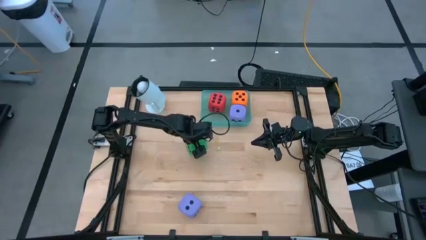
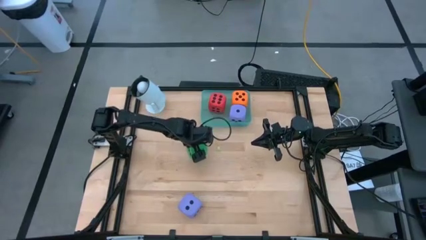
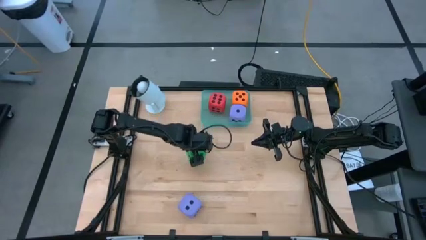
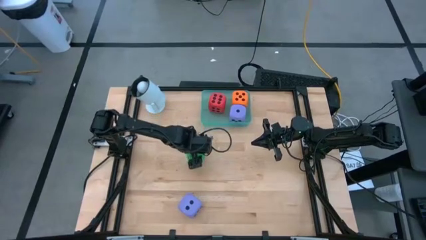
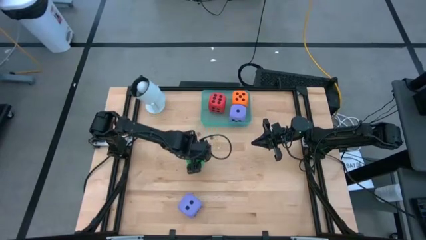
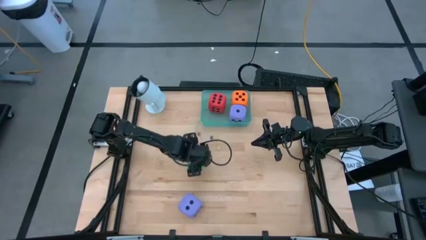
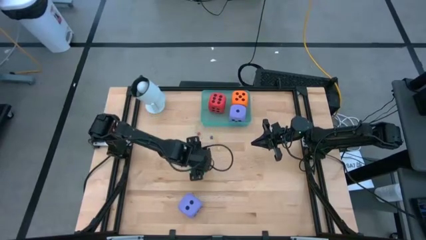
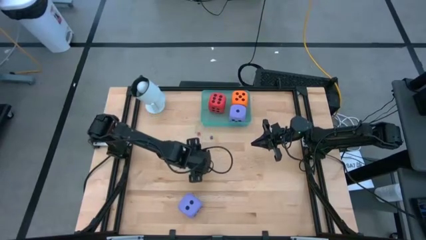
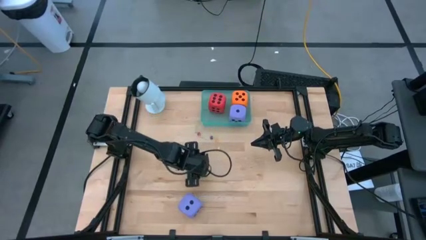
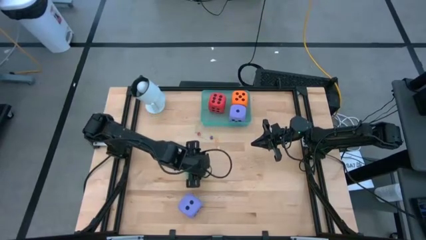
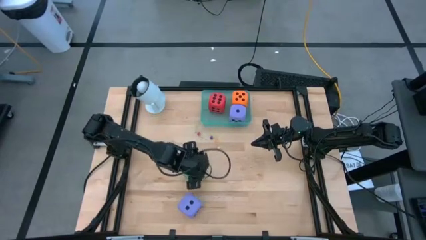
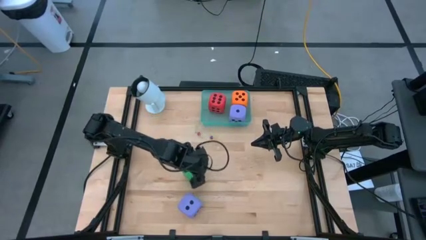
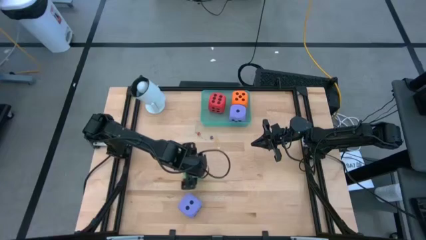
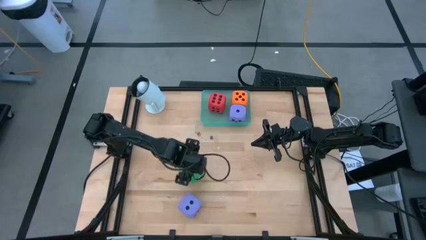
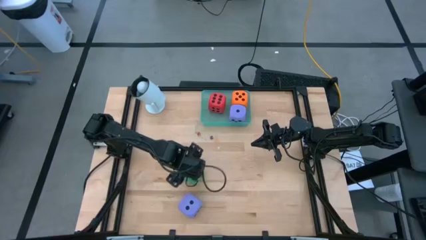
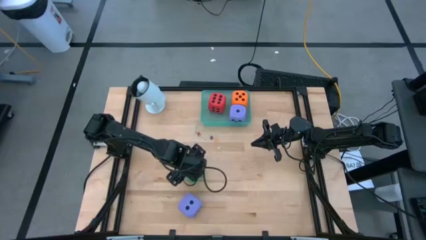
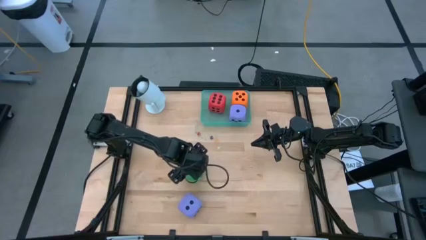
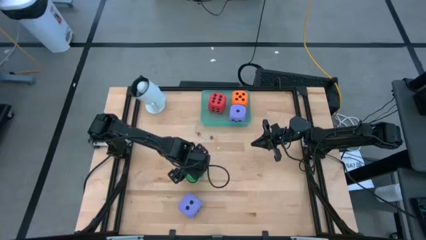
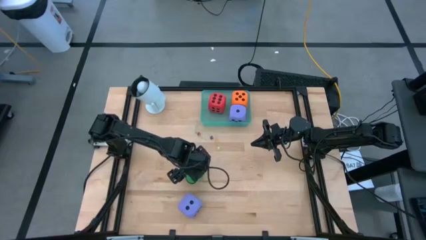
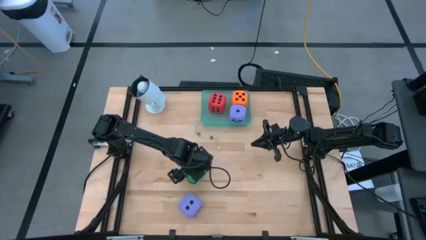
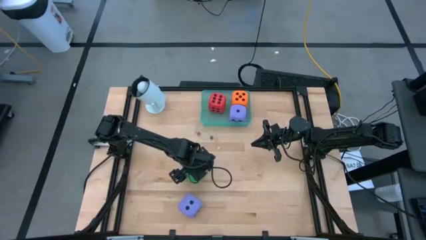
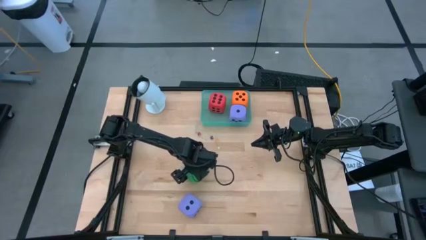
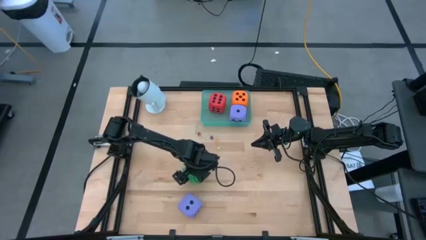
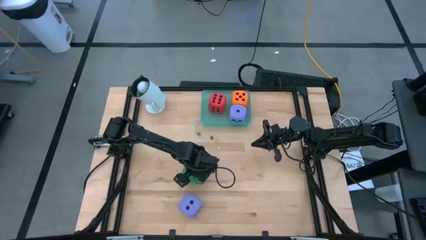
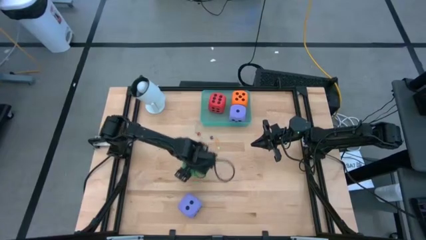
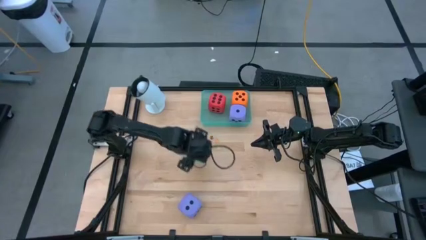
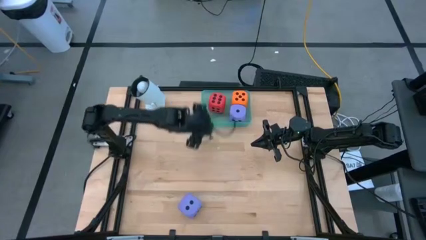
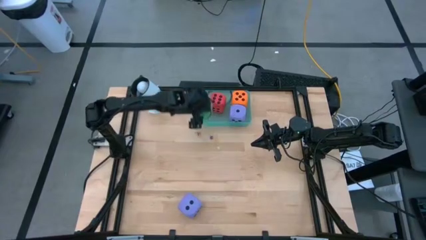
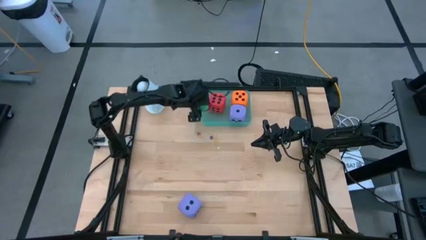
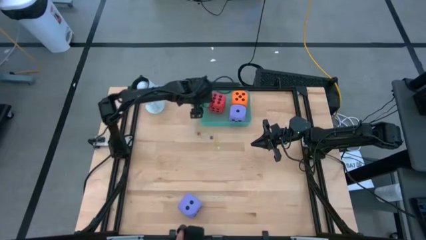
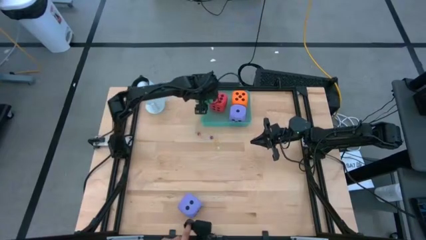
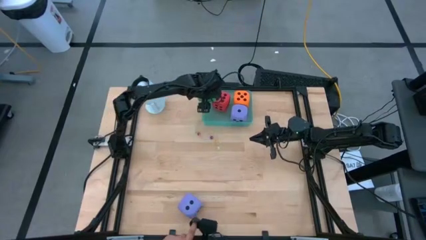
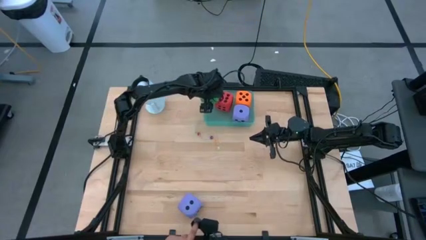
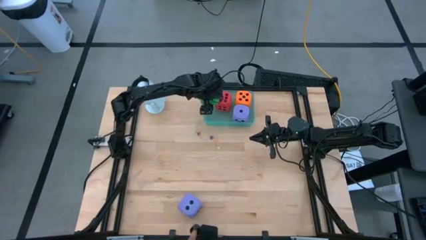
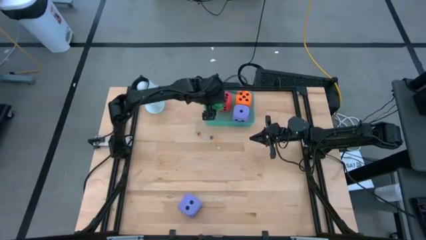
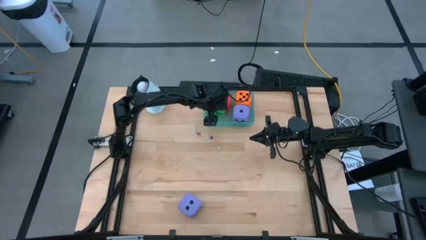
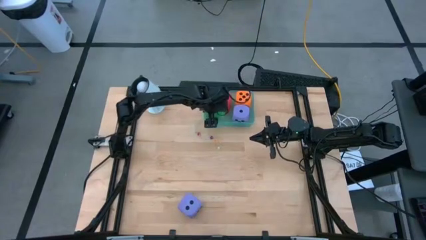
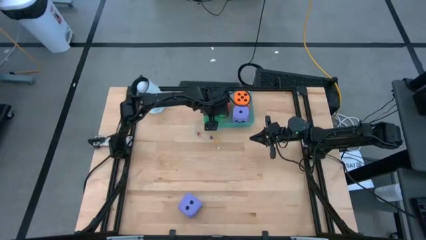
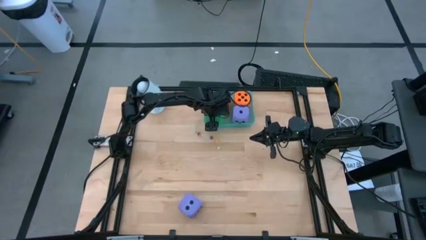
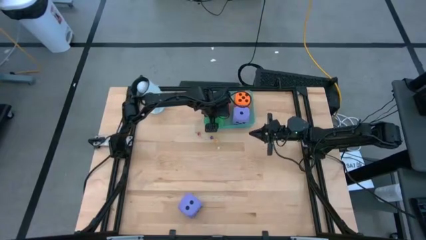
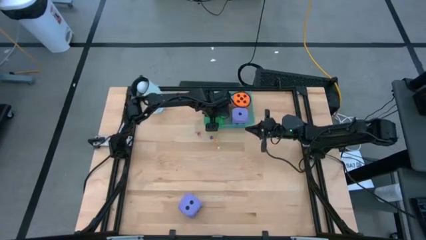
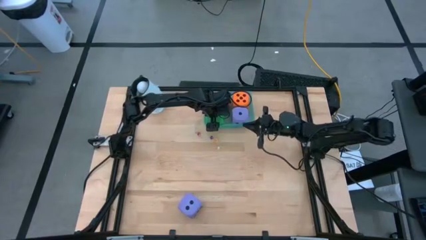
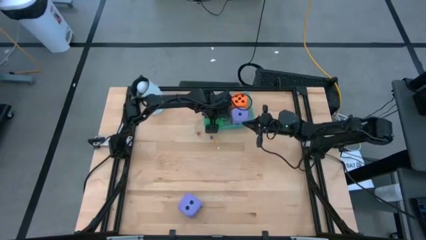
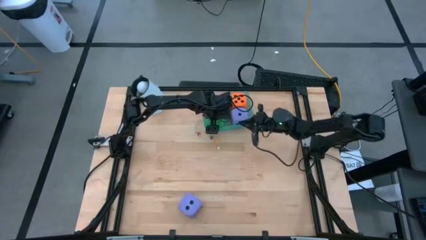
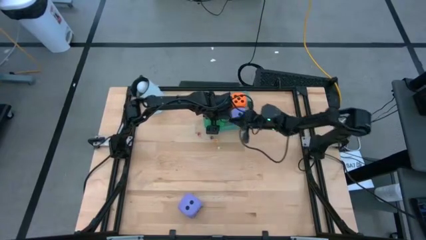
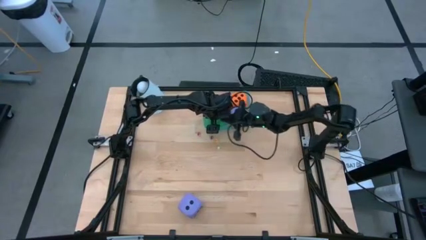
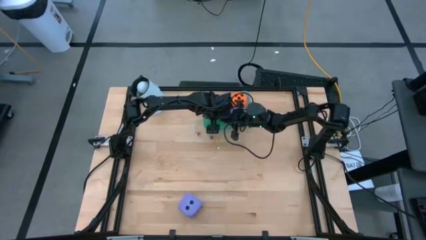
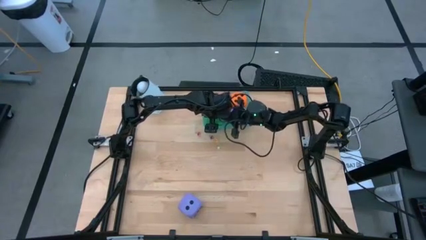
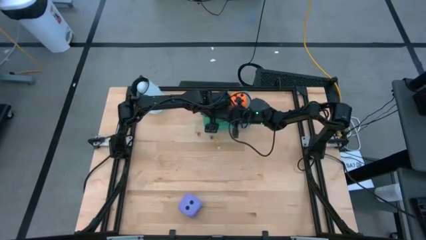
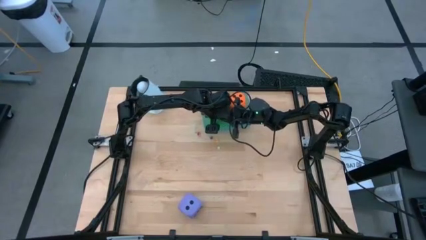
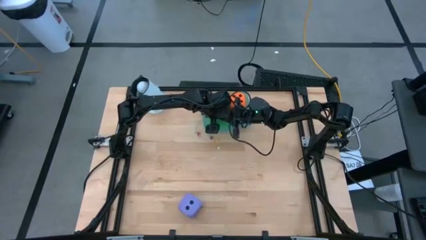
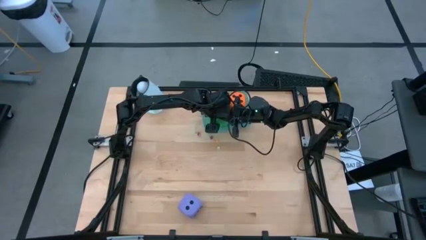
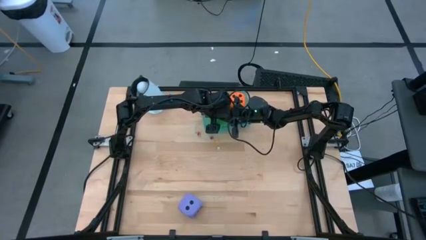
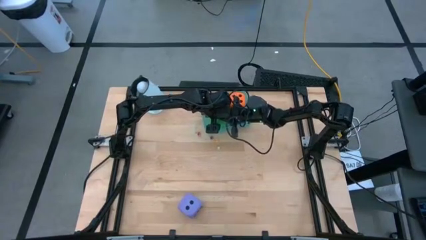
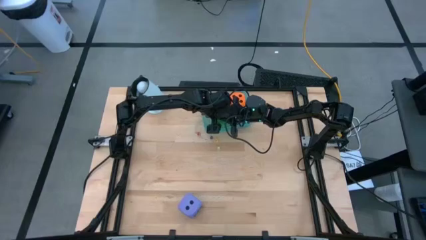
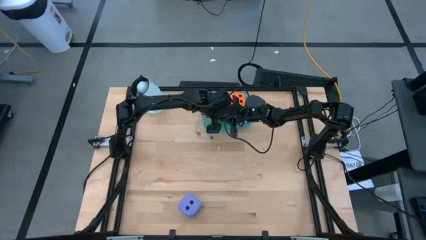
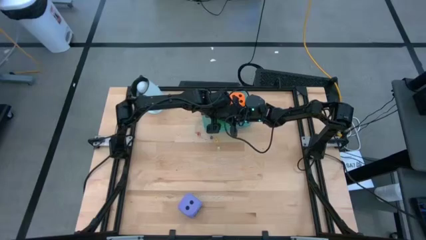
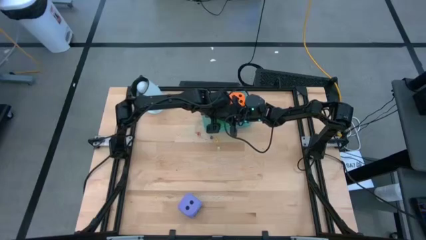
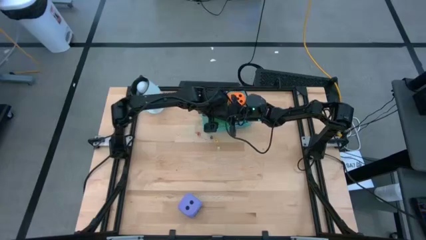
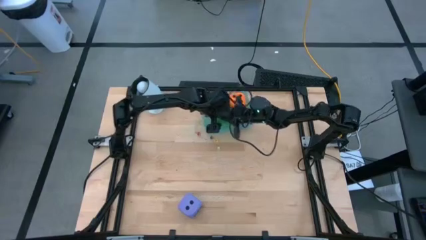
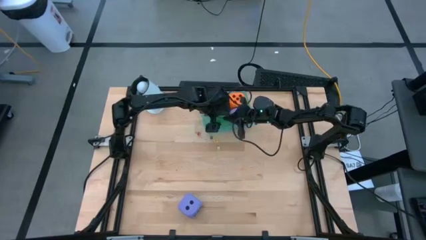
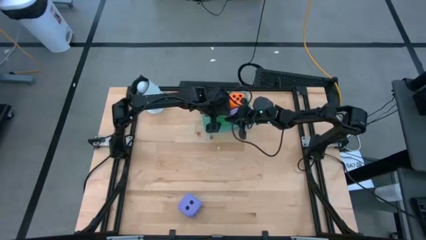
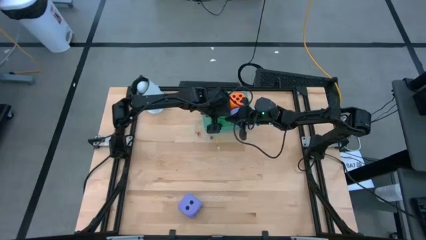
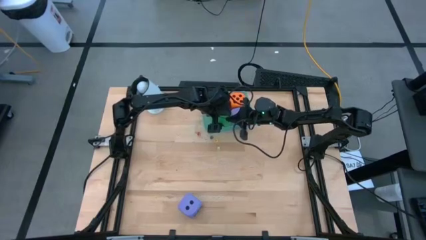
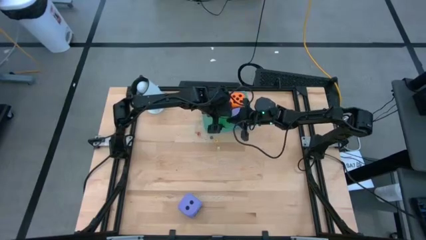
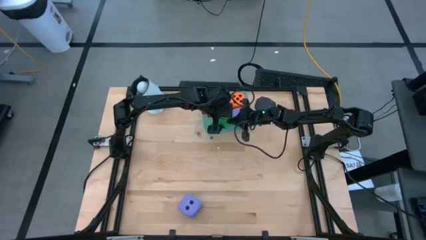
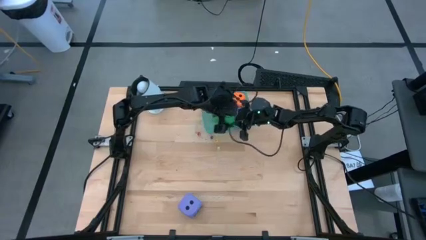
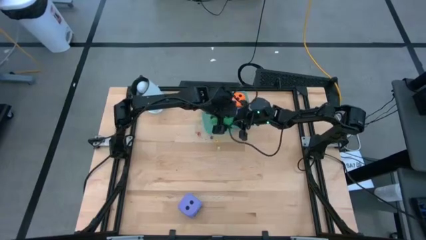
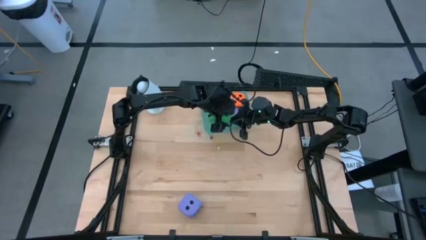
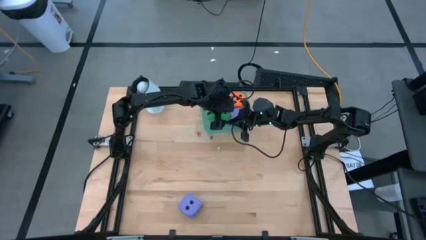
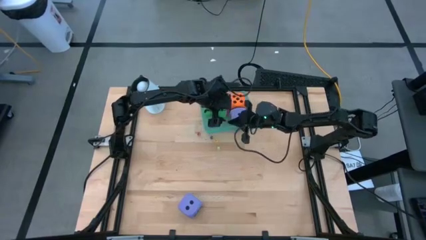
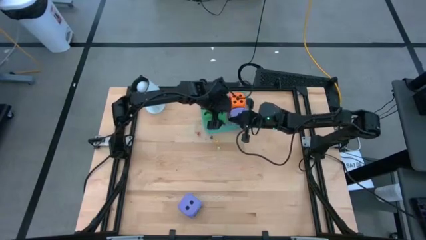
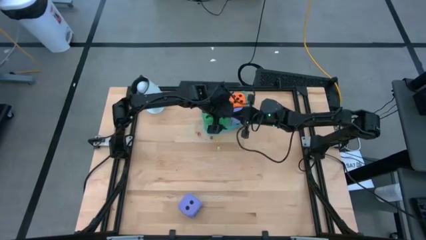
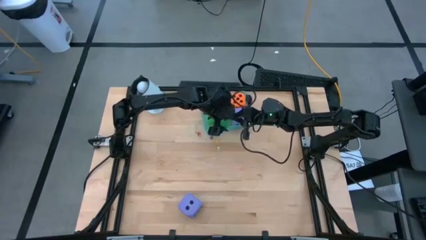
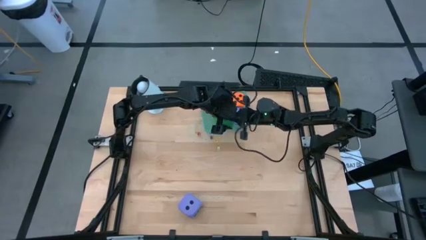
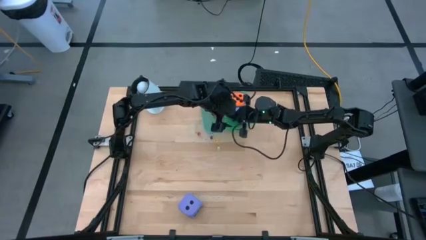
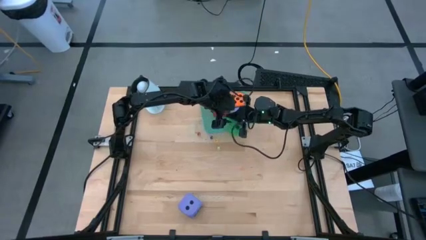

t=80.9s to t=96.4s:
Task: Pick & Place Dice
Put the big green dice into the bin
